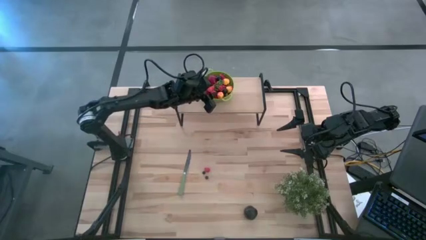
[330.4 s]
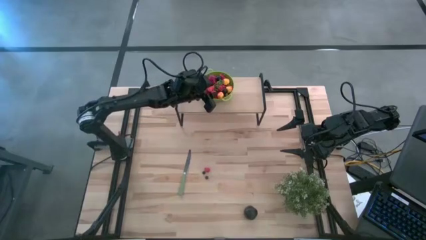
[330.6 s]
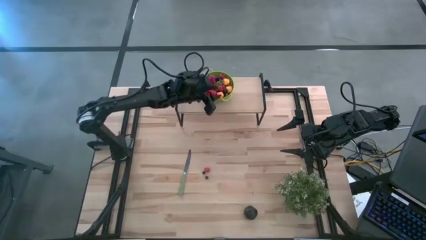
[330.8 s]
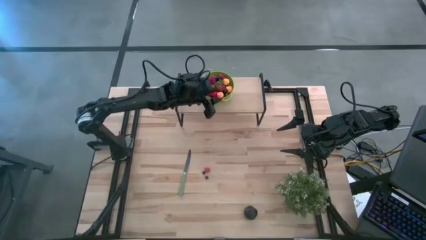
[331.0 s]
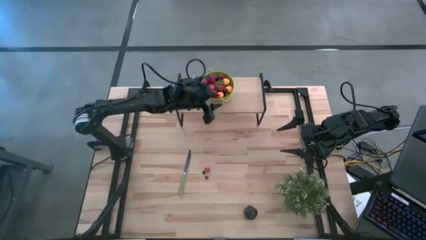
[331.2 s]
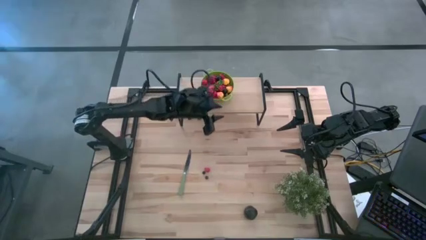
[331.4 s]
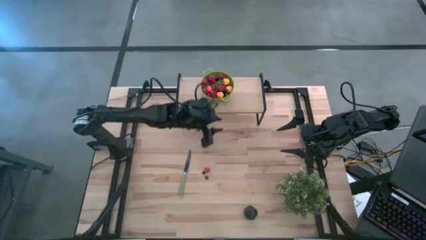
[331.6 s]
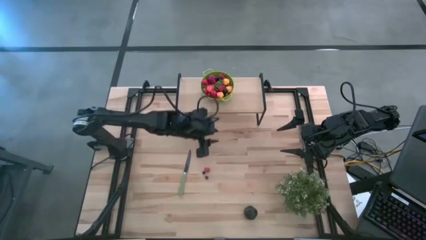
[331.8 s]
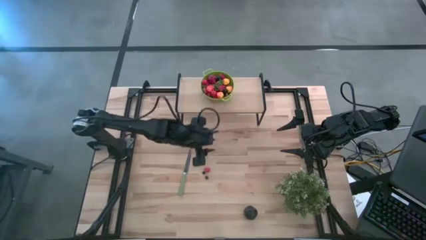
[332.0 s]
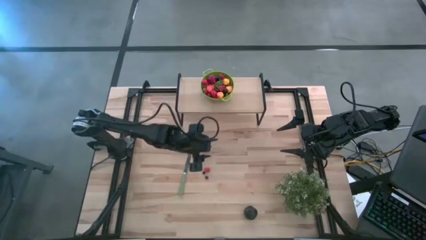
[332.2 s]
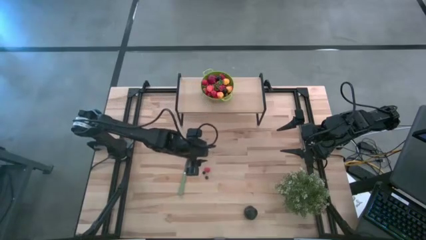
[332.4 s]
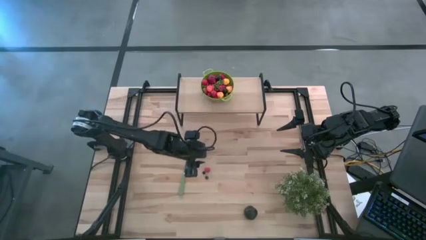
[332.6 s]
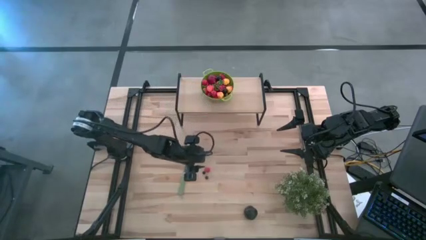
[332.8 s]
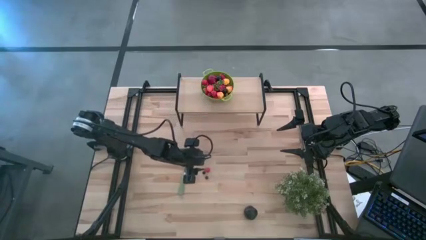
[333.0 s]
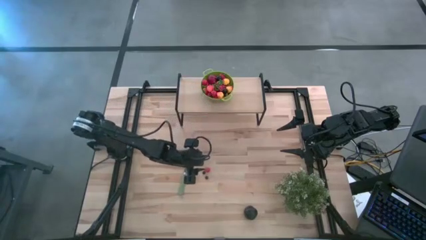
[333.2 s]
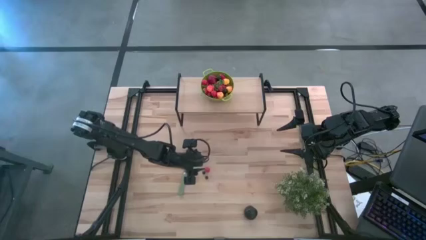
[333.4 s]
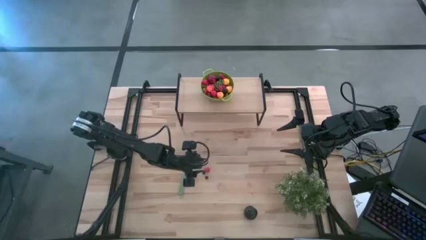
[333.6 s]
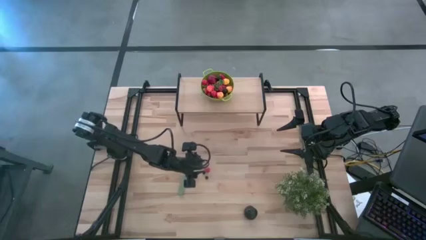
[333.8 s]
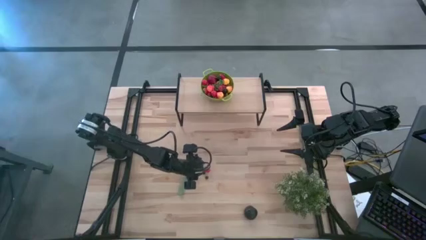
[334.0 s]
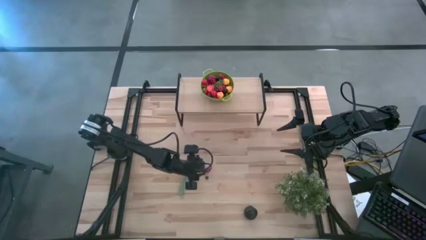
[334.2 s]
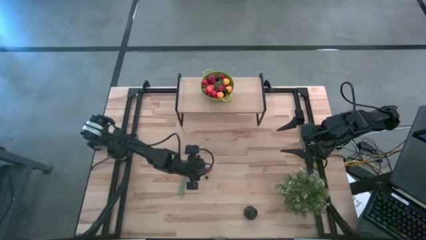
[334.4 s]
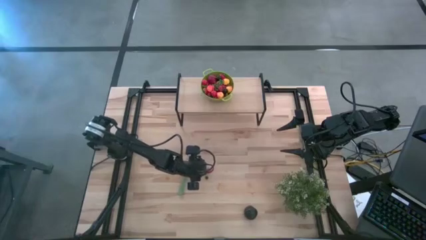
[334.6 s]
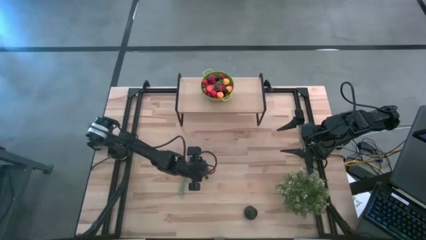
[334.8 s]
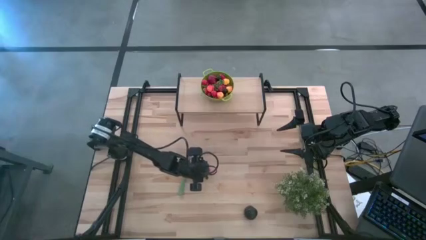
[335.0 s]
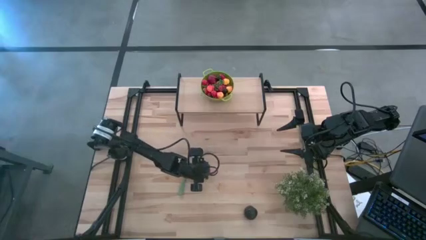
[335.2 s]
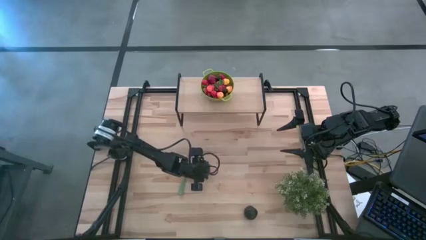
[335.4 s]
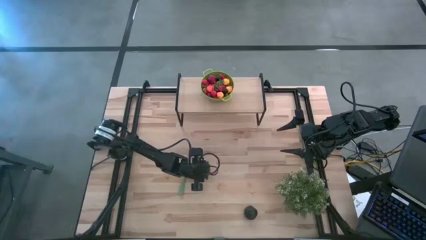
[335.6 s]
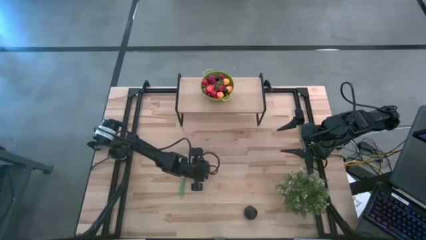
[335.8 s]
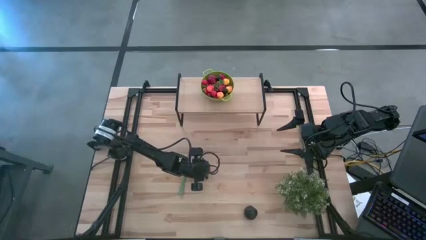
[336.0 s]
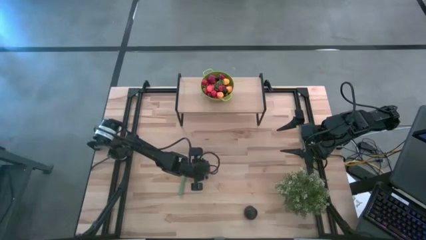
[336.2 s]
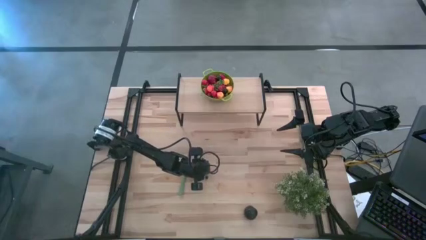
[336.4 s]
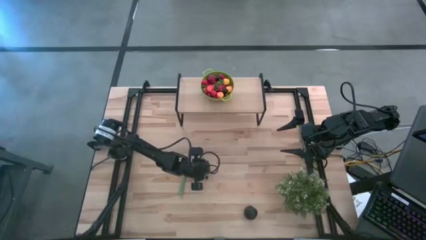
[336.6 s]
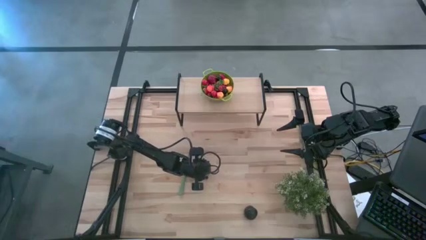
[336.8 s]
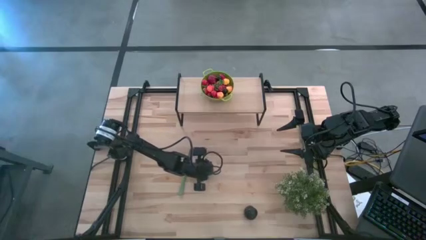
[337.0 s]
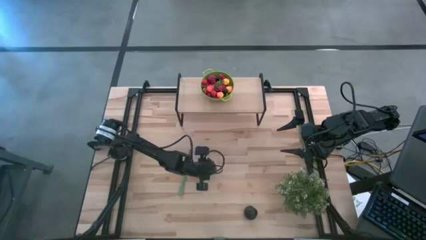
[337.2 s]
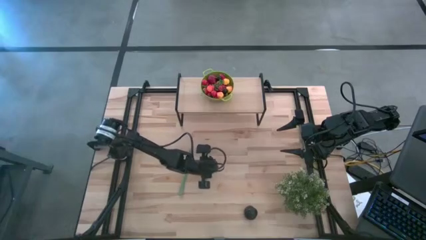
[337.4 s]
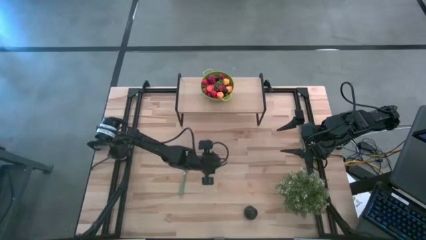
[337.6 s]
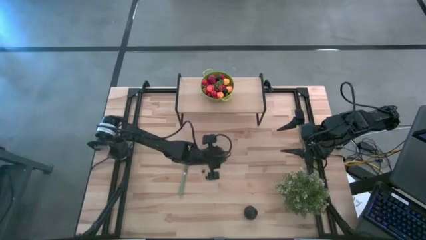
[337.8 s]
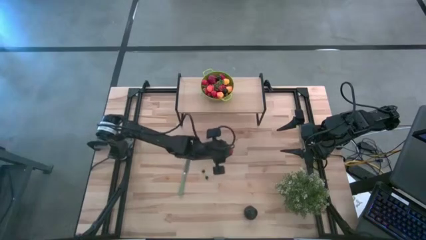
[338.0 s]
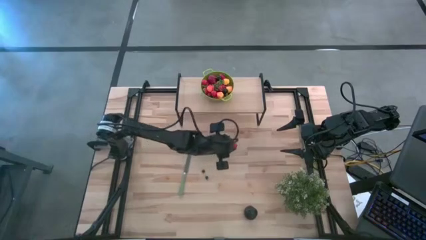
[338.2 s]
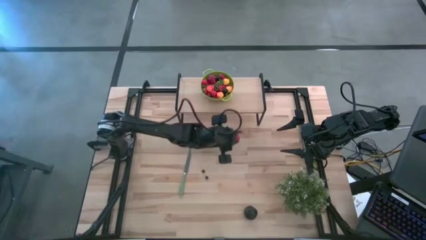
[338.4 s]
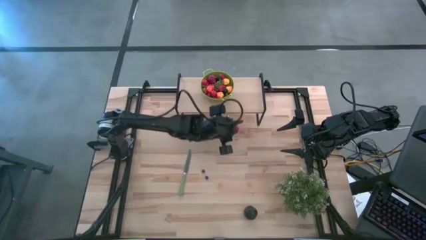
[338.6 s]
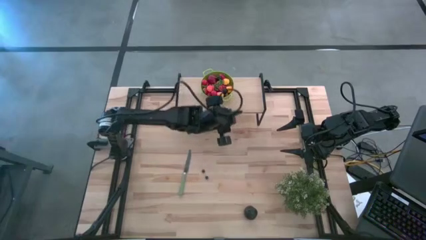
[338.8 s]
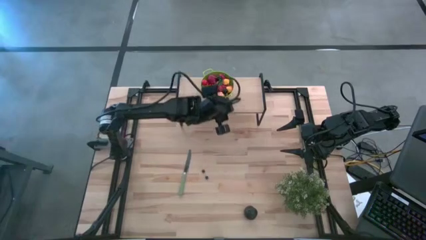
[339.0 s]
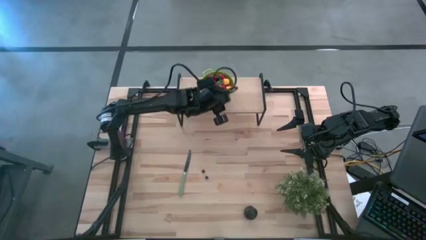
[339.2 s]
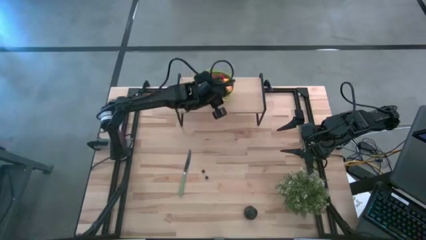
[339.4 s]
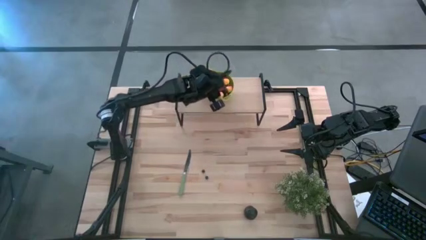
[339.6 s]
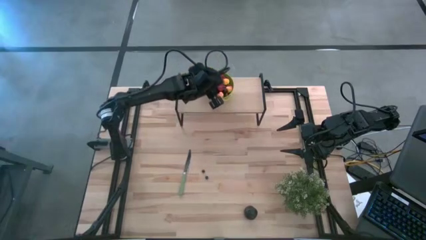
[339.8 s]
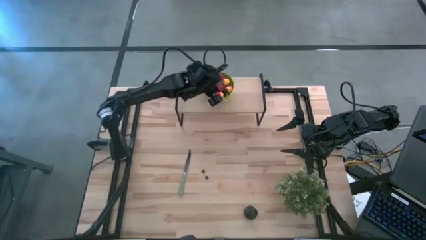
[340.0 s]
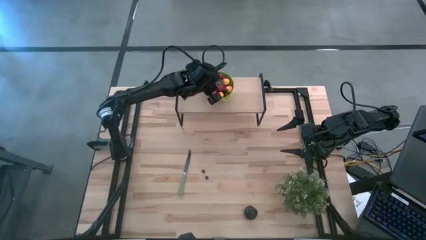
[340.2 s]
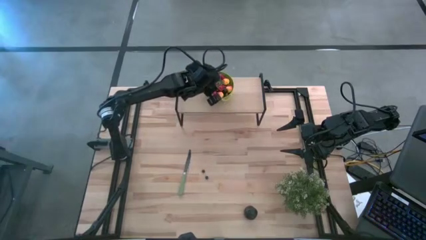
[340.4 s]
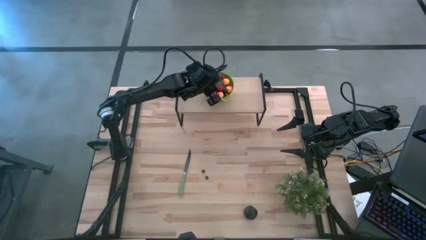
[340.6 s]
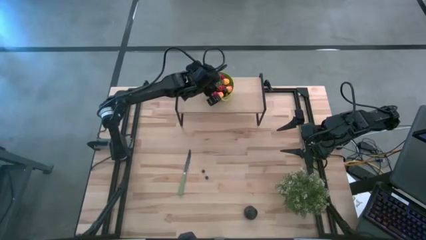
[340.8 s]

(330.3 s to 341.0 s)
Task: Pick & Place Fruit
Put the raspberry into the green colander on the shelf

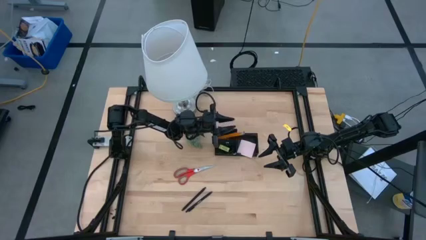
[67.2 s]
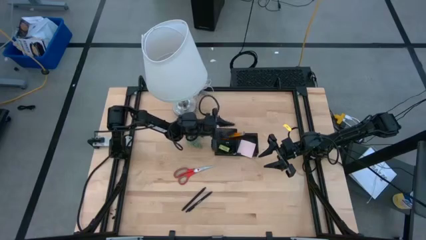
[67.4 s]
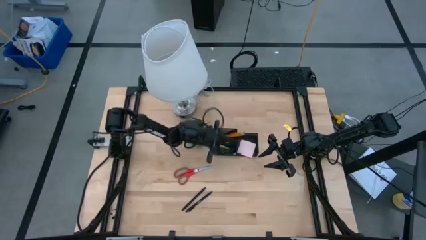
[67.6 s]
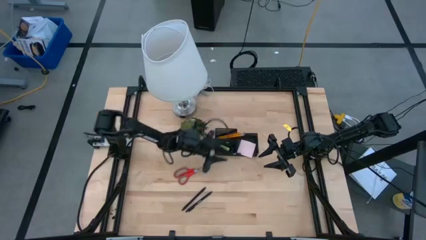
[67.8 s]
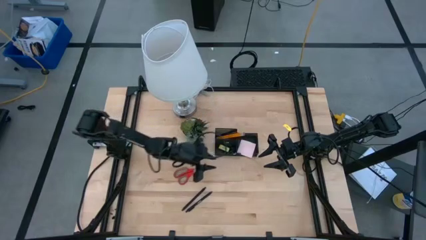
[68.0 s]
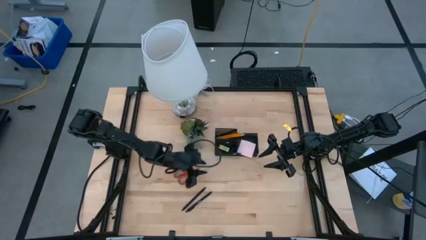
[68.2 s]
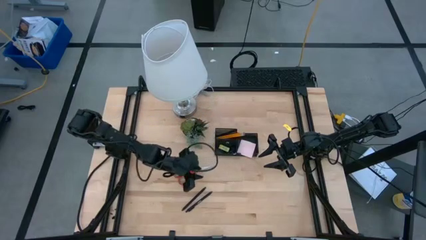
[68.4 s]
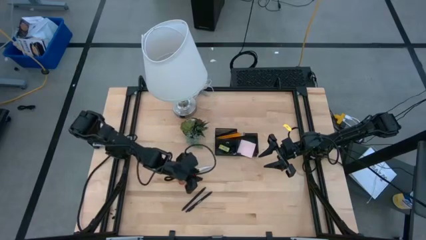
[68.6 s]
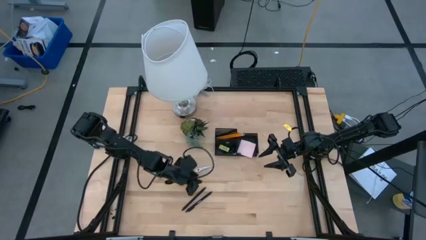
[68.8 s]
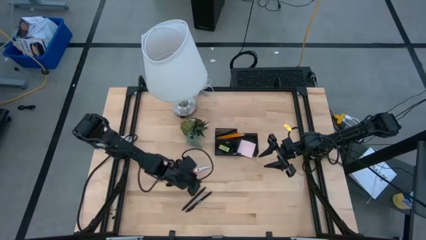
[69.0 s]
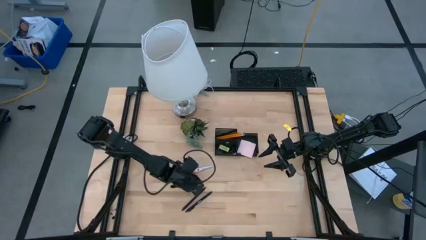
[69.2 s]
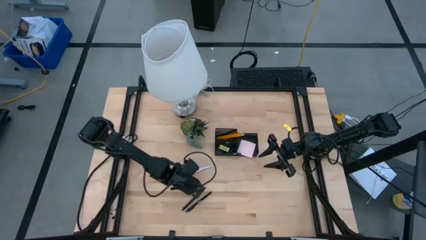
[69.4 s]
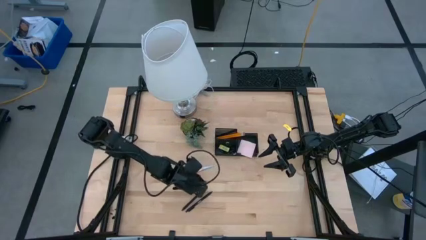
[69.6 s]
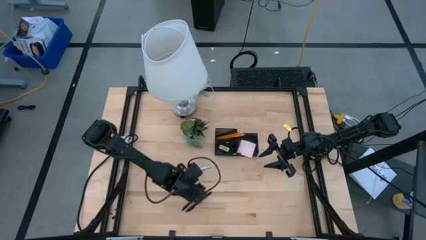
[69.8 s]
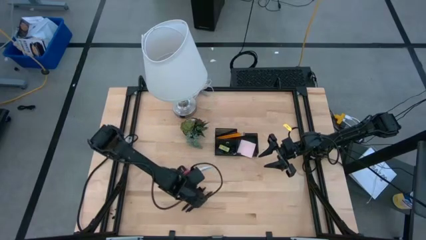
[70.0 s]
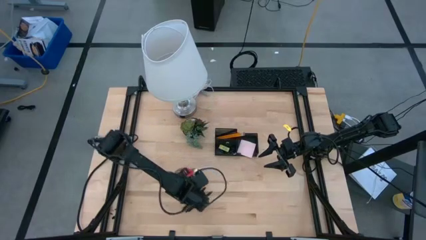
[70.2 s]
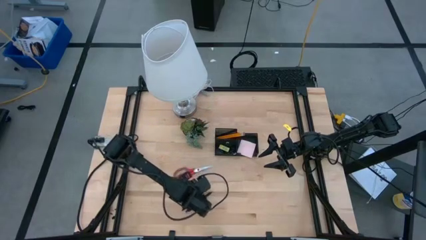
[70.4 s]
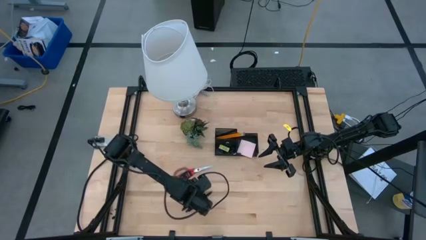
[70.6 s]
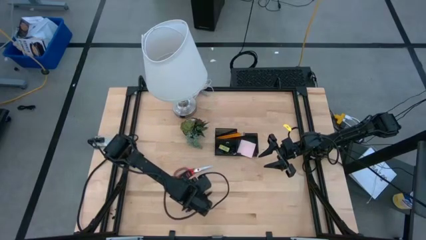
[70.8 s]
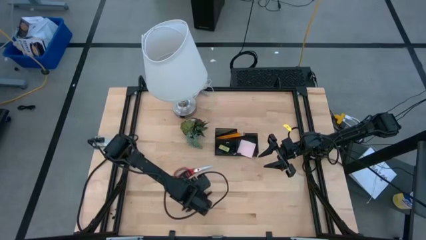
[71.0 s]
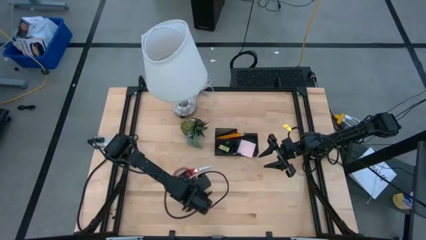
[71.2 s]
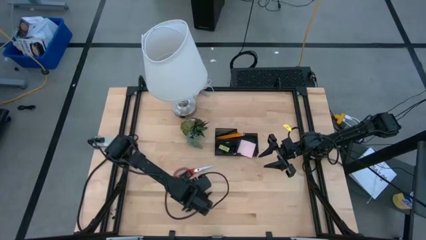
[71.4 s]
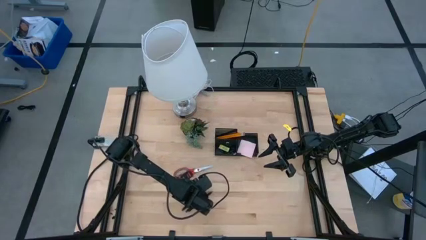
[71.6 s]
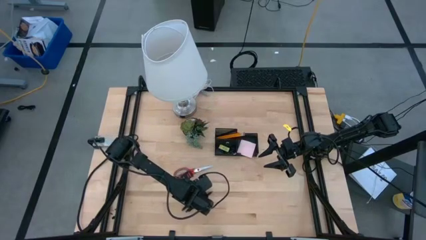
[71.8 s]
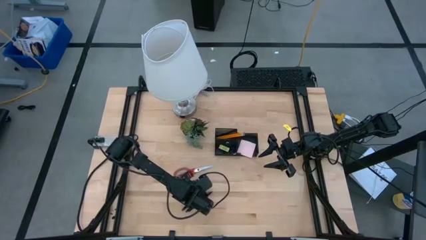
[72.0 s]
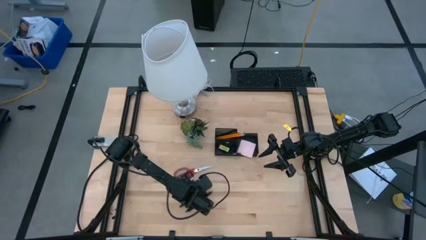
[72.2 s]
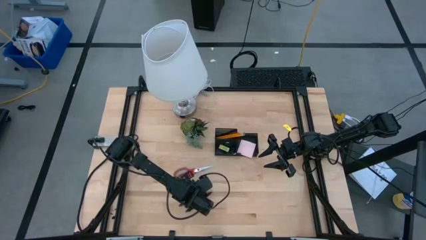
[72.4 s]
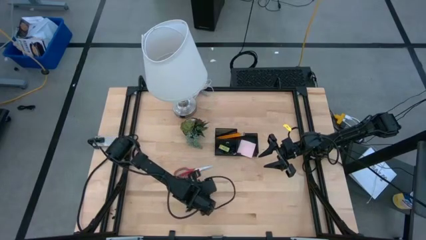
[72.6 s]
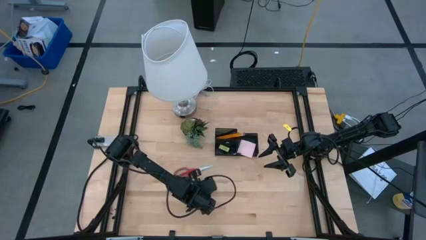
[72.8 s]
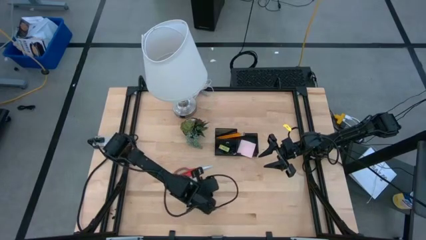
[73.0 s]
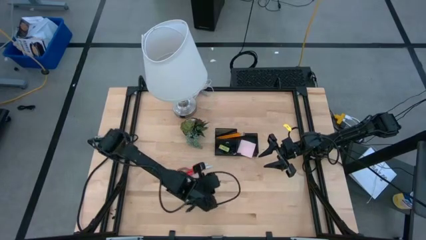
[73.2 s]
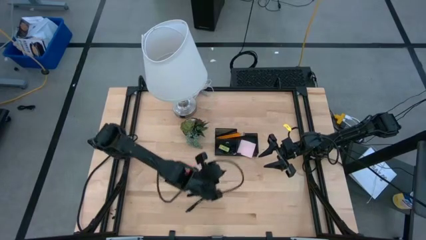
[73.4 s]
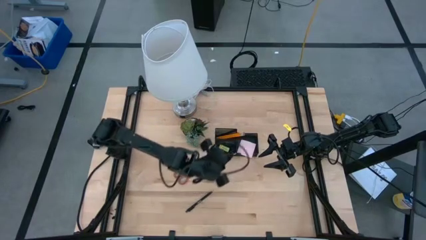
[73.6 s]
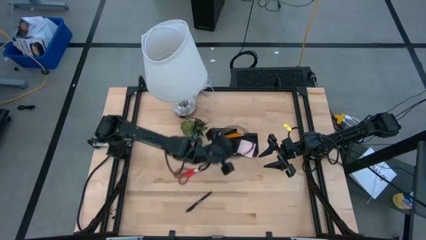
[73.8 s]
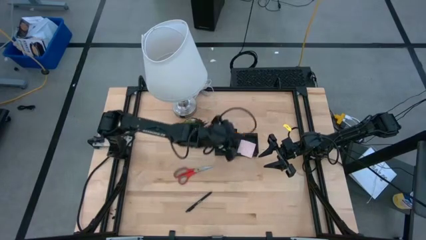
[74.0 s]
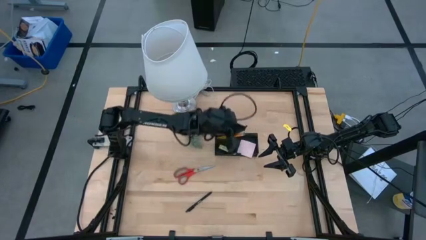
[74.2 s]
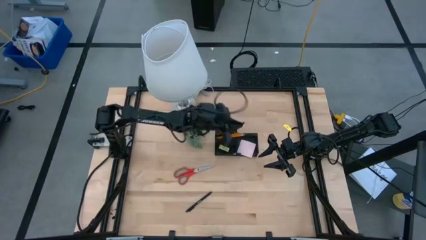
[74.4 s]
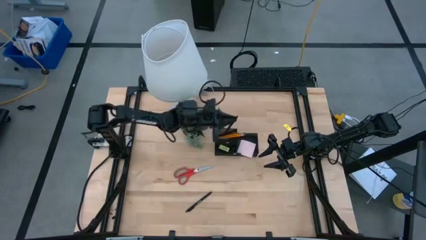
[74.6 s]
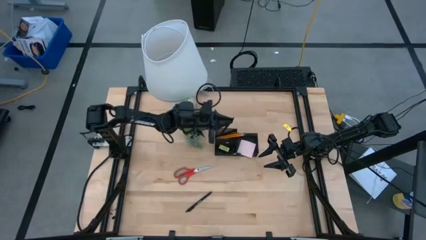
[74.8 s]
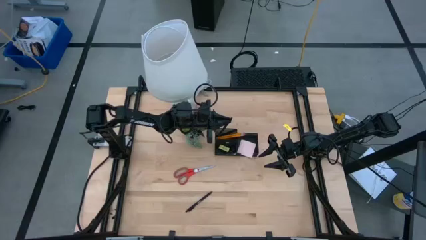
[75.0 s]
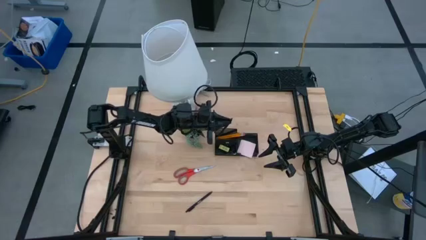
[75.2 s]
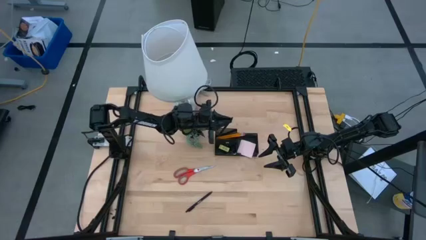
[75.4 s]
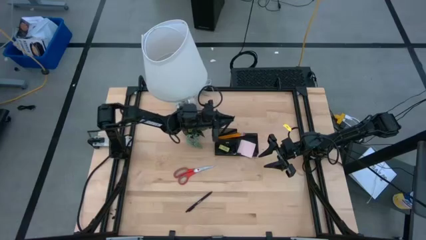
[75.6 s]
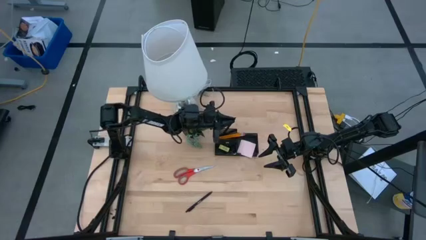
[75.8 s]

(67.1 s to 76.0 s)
Task: Pick and place office supplies into organizer
Put the black pen into the desk organizer
